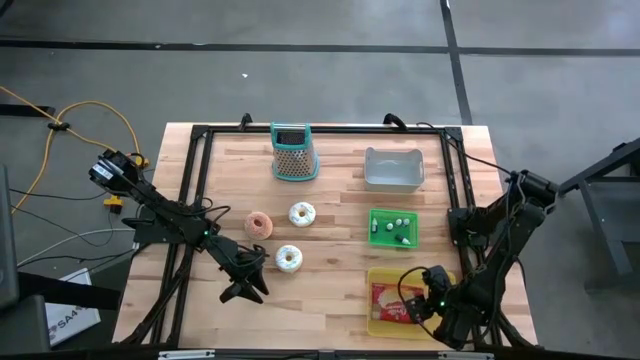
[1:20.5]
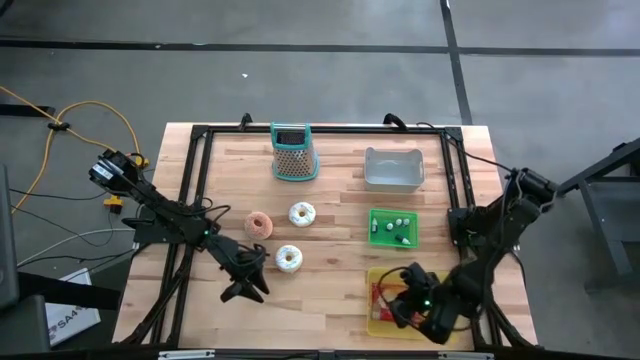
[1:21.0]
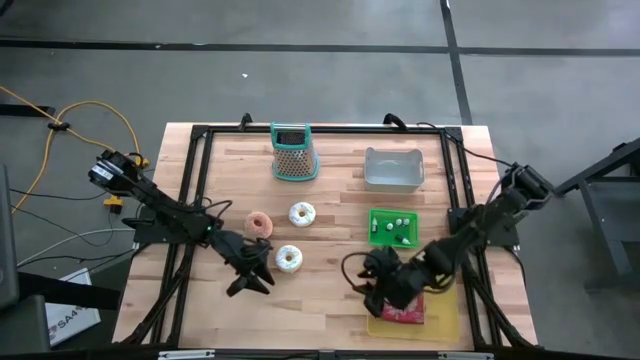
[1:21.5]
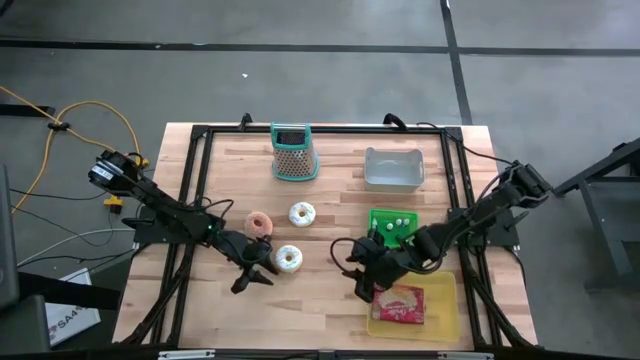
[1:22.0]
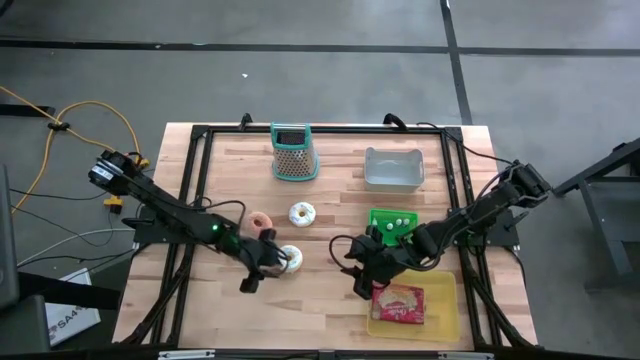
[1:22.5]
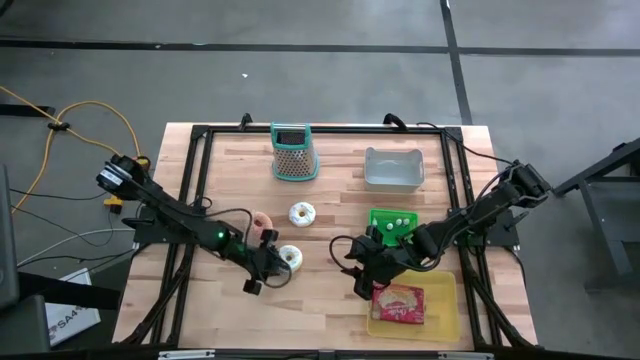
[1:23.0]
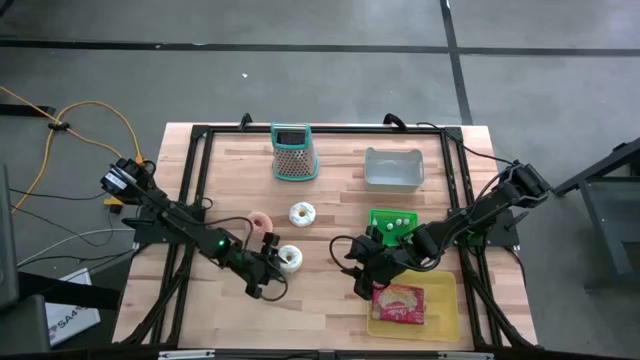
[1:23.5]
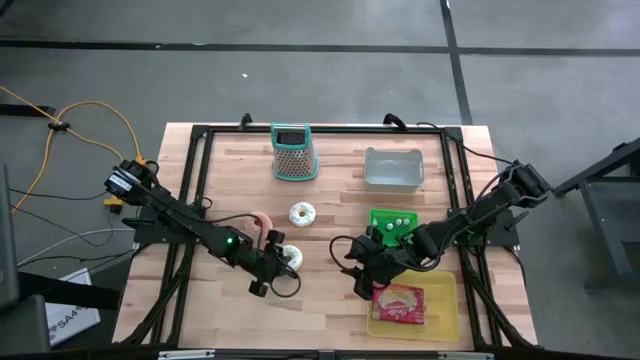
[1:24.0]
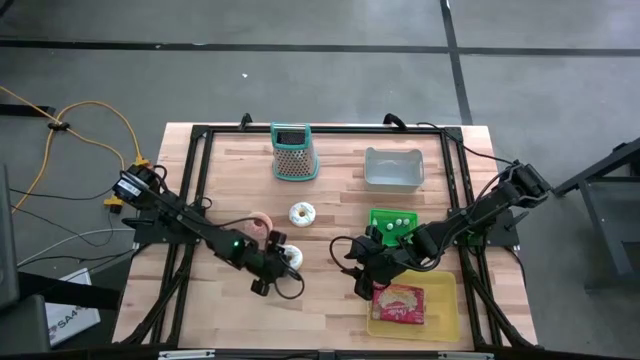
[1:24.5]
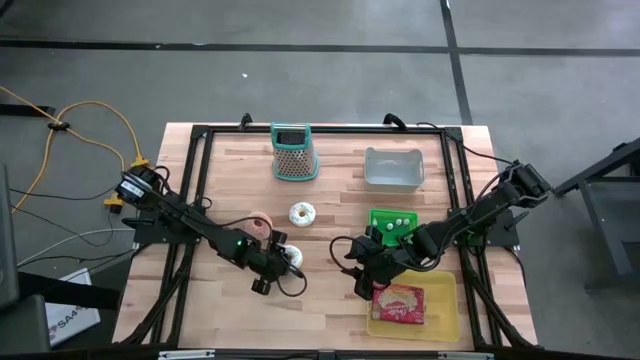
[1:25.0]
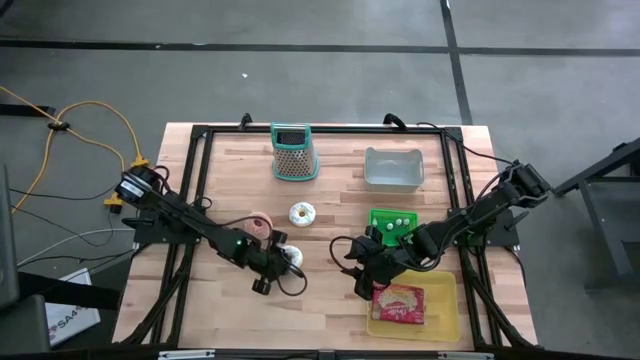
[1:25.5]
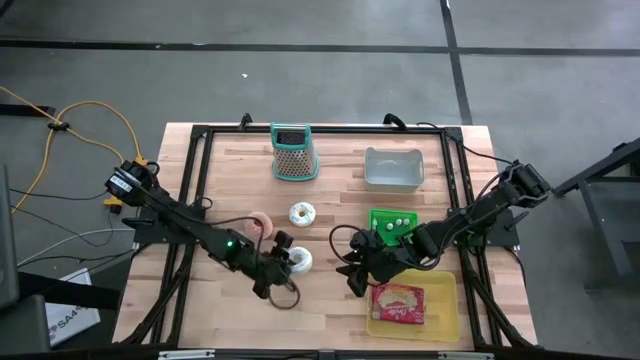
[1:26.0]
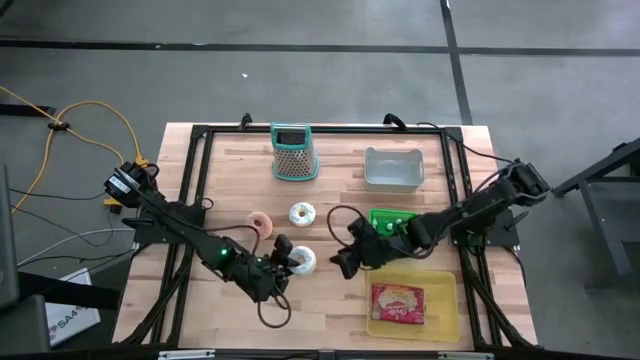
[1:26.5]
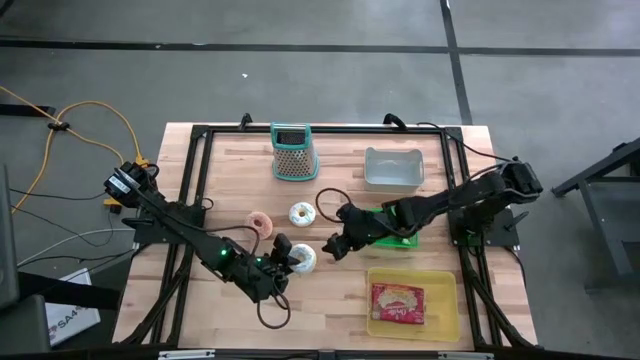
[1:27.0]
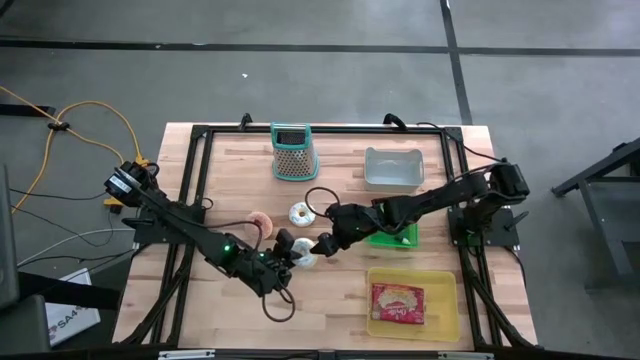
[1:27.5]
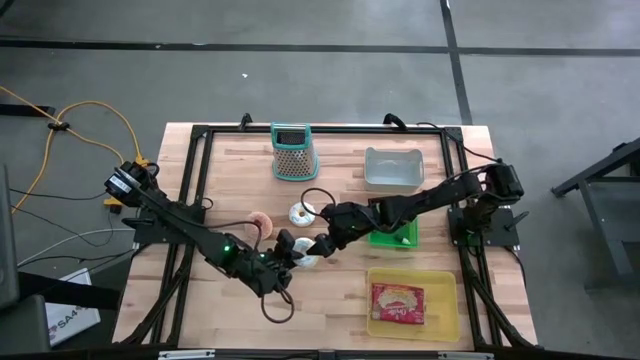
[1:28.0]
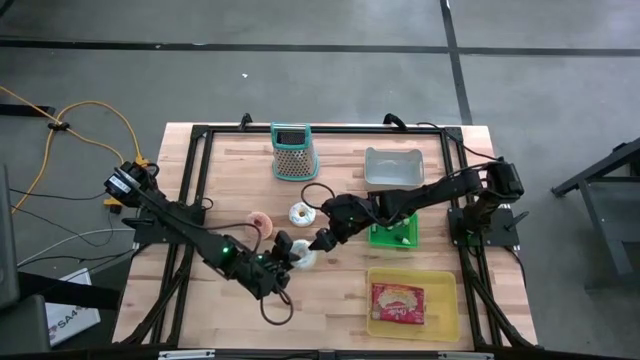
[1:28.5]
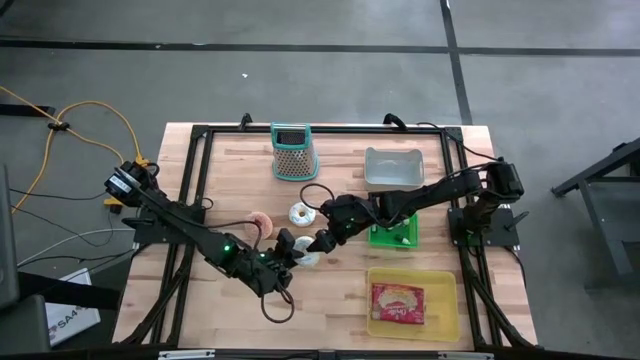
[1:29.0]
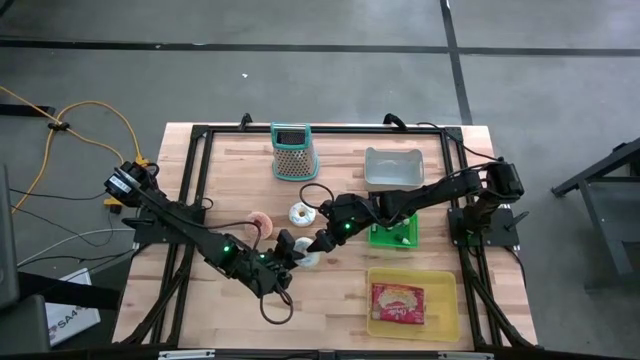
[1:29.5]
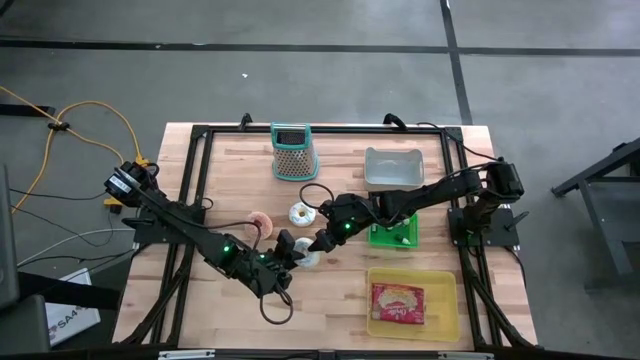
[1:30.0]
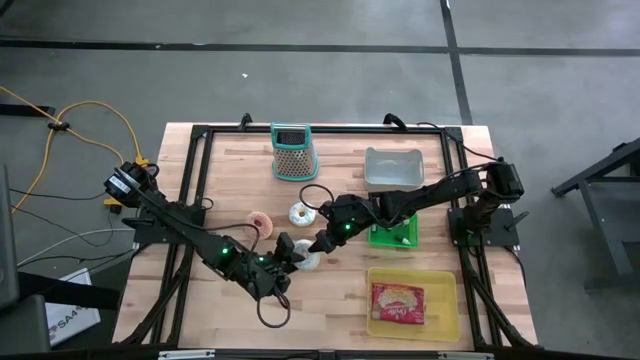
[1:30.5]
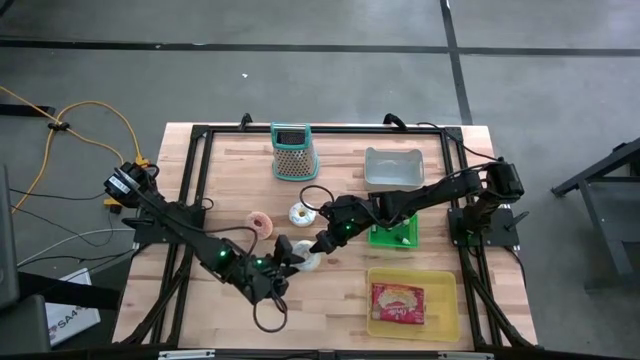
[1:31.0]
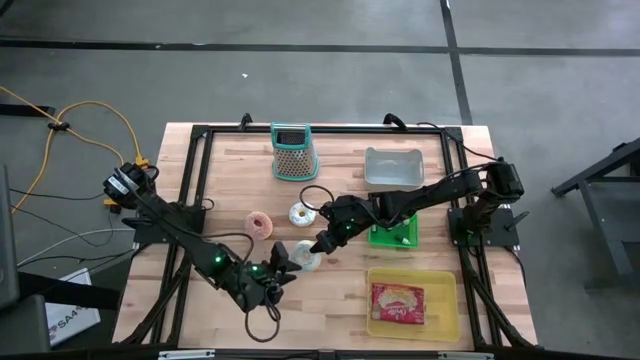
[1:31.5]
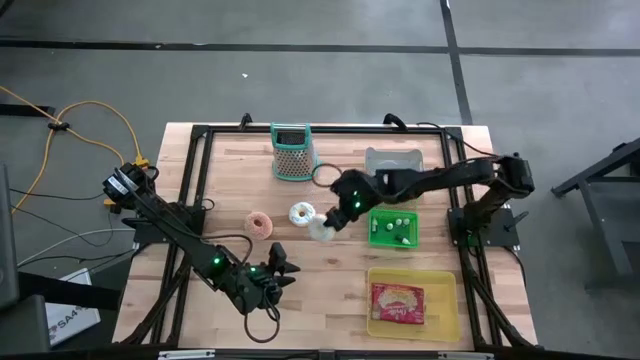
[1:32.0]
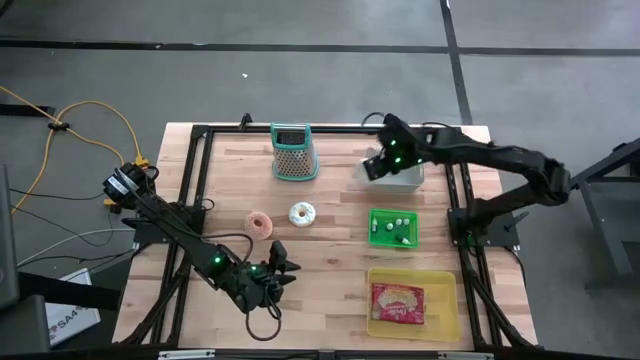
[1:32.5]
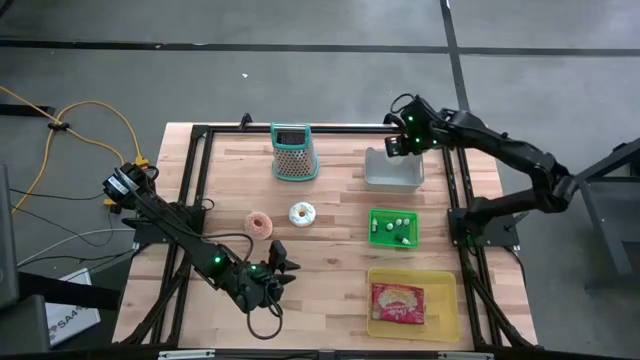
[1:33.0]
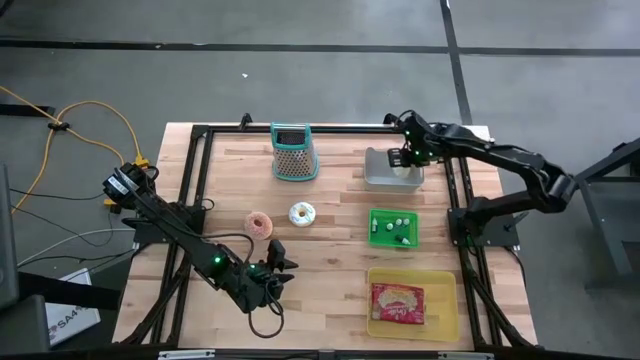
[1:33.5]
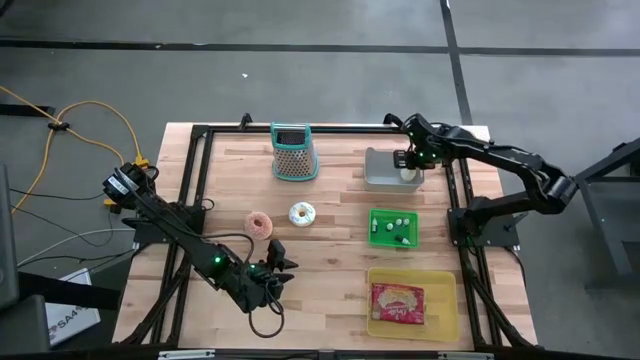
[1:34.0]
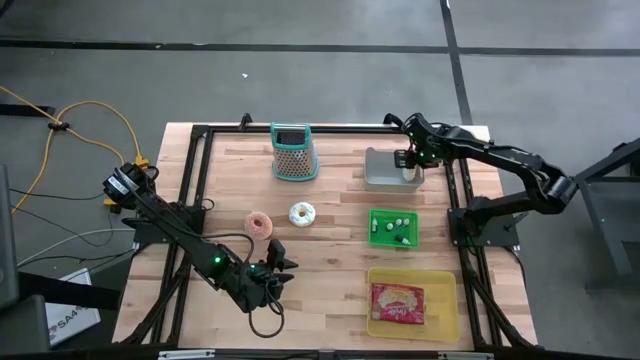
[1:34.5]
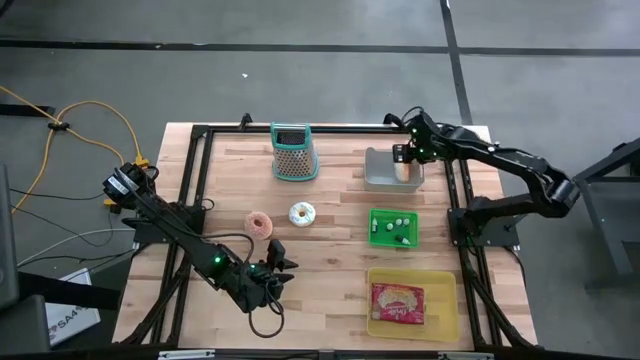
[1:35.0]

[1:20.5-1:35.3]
Put the bottom white donut into the gray bin

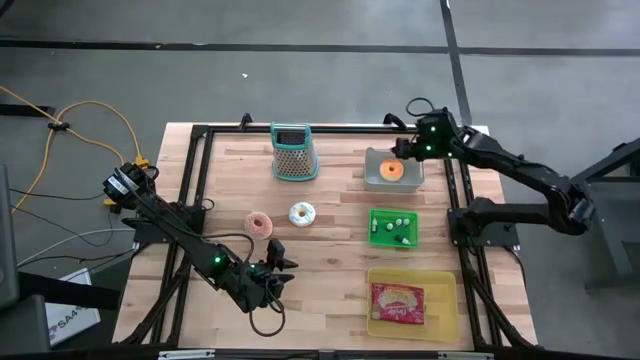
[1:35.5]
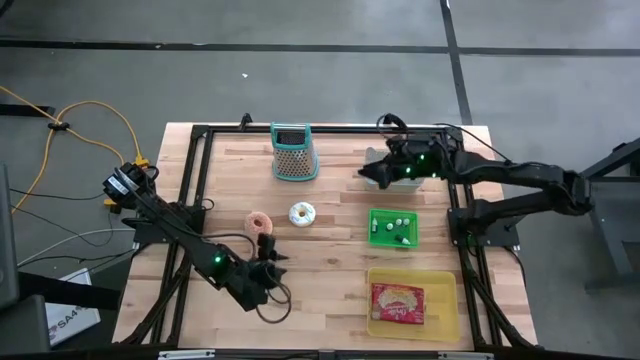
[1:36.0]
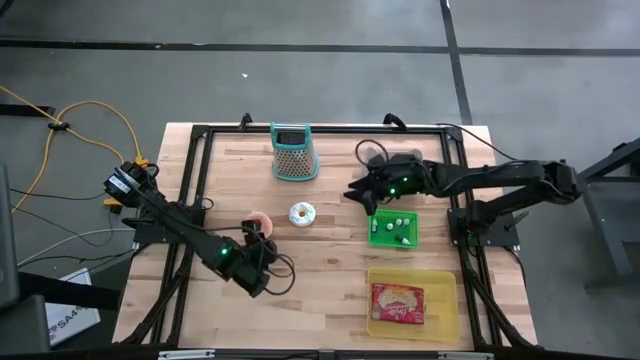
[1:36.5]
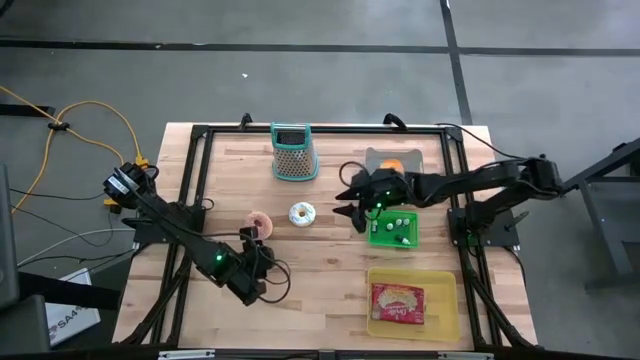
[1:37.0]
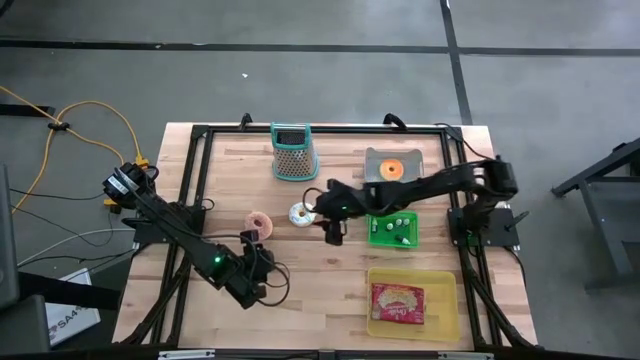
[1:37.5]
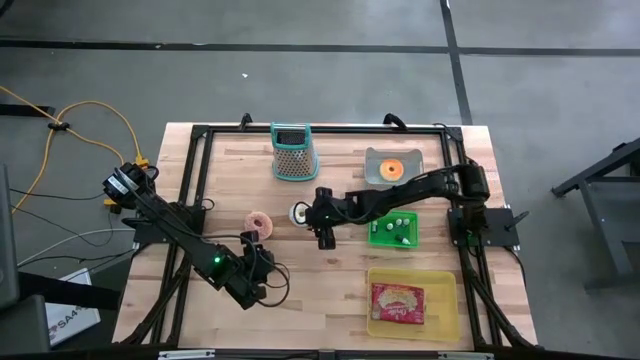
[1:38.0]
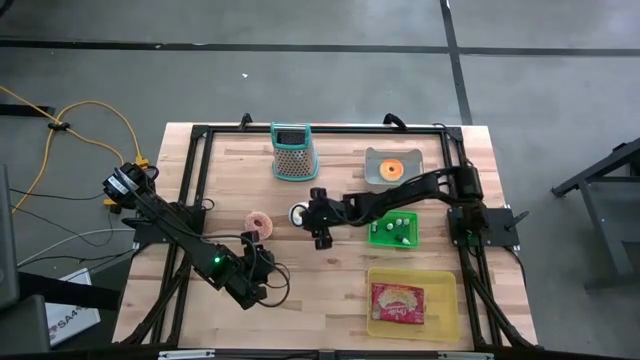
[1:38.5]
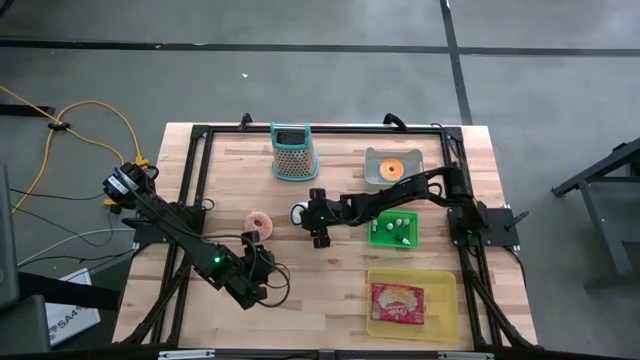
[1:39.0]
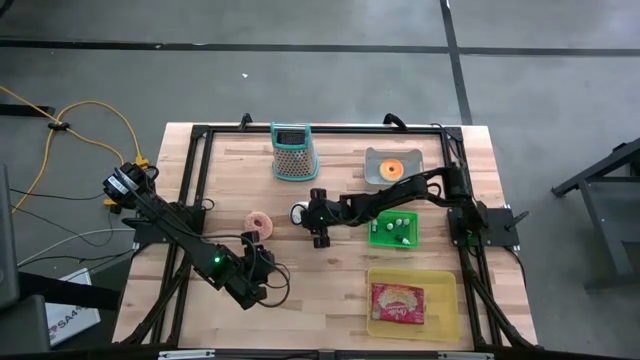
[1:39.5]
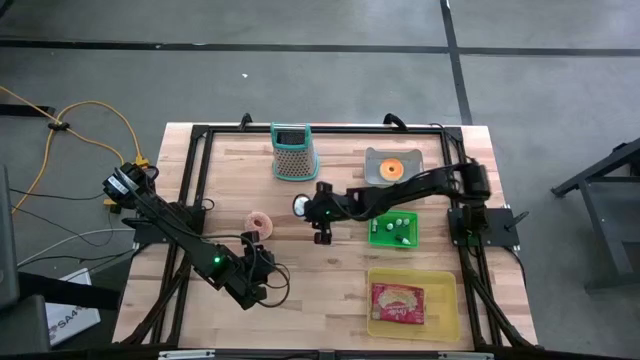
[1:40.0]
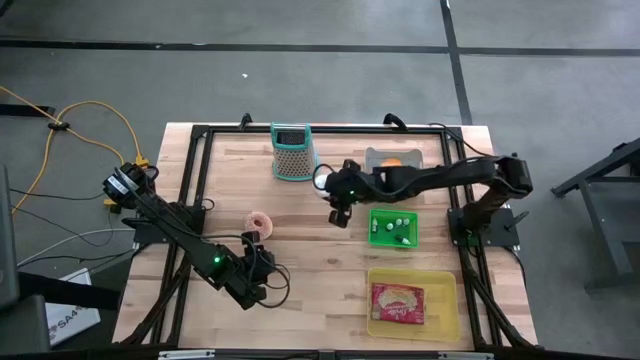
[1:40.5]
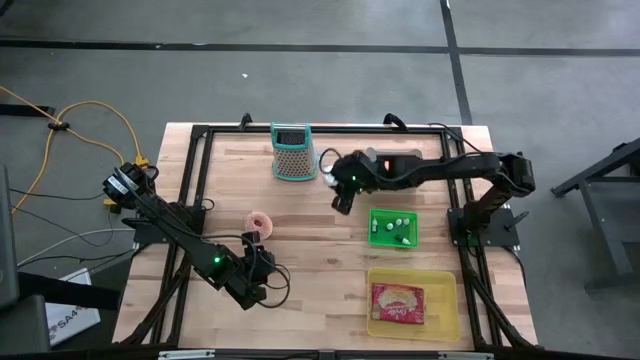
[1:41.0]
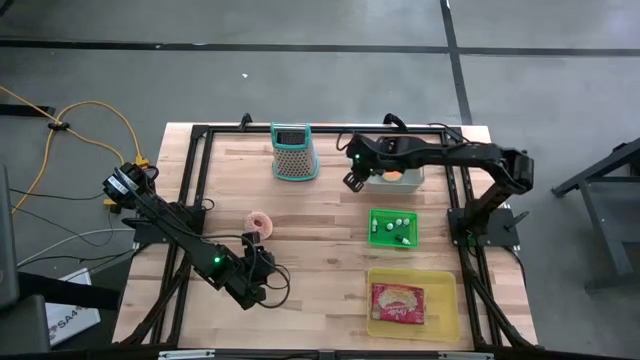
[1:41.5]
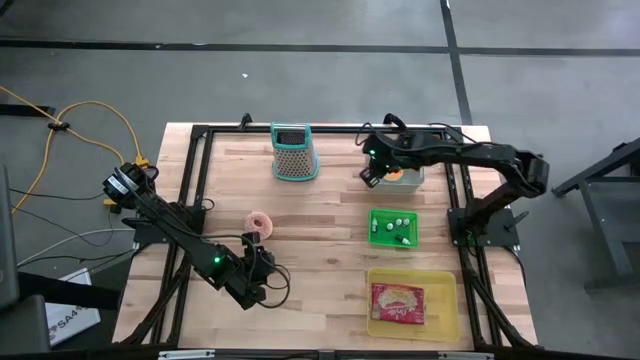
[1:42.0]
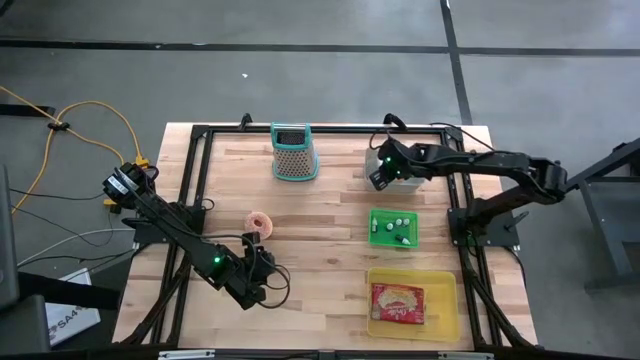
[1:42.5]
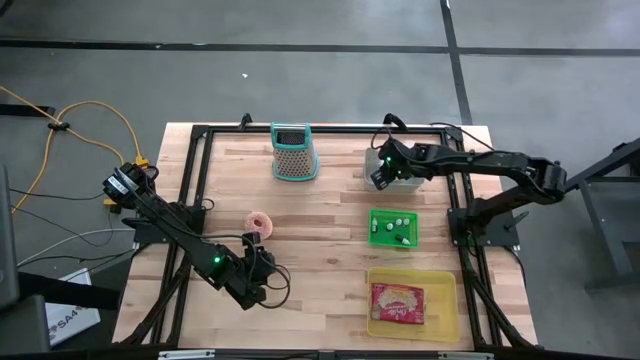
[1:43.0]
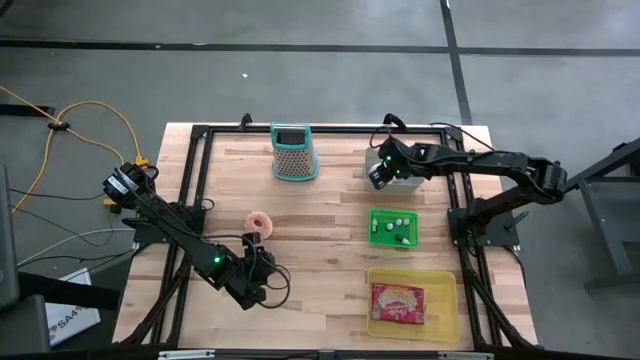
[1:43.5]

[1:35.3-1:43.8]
Put the white donut into the gray bin
